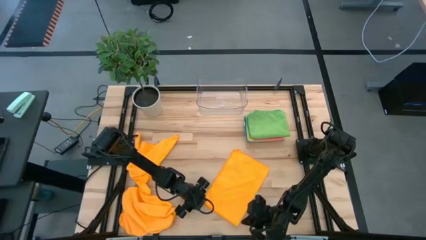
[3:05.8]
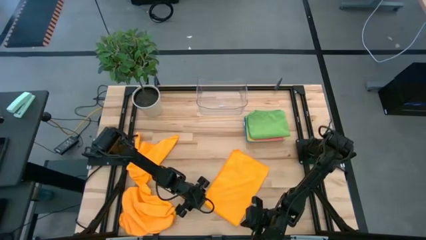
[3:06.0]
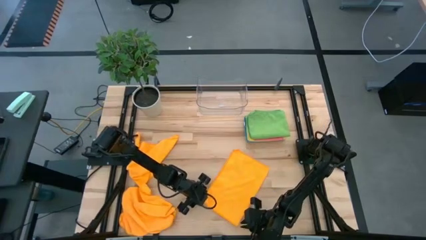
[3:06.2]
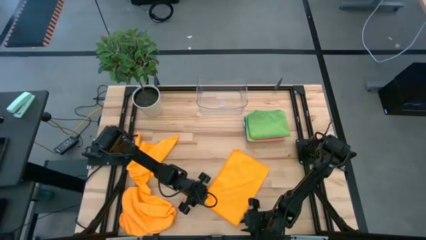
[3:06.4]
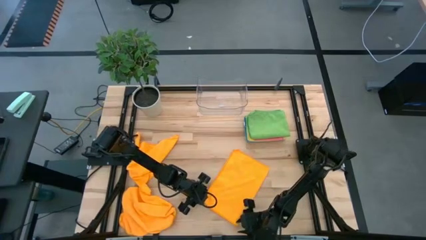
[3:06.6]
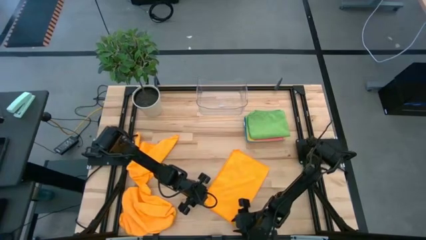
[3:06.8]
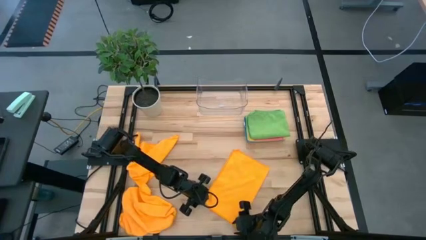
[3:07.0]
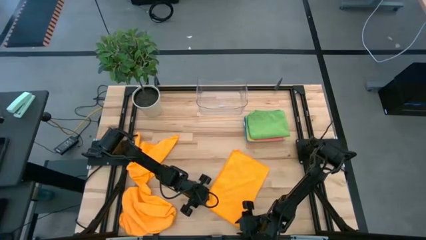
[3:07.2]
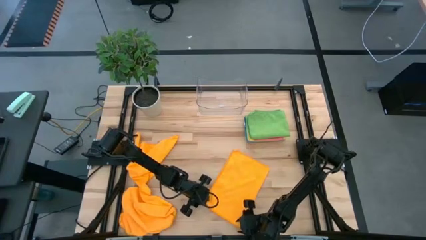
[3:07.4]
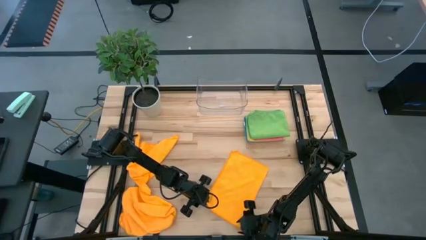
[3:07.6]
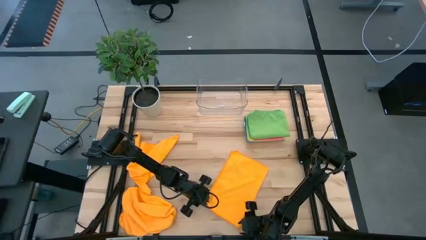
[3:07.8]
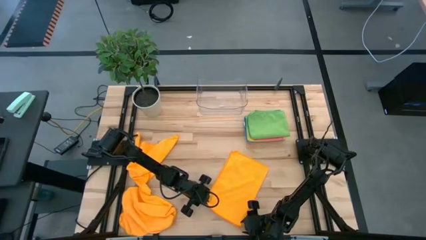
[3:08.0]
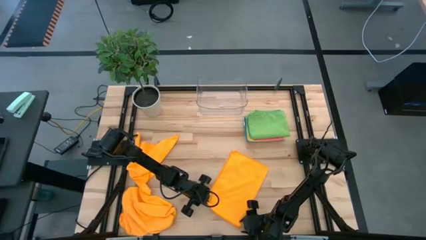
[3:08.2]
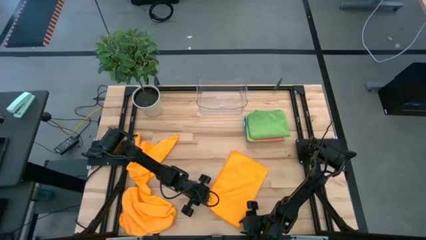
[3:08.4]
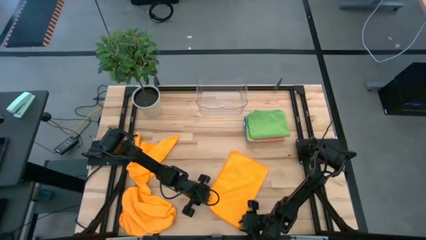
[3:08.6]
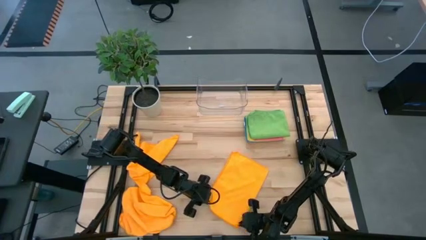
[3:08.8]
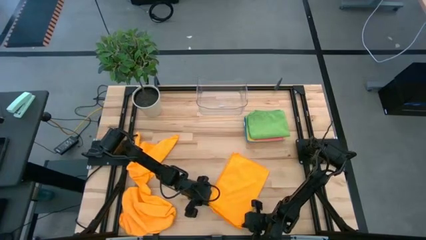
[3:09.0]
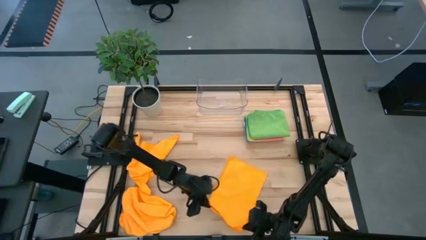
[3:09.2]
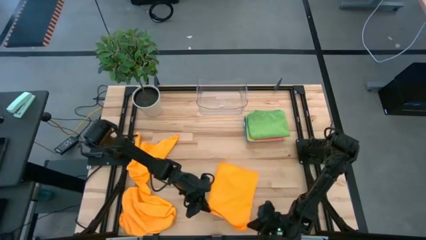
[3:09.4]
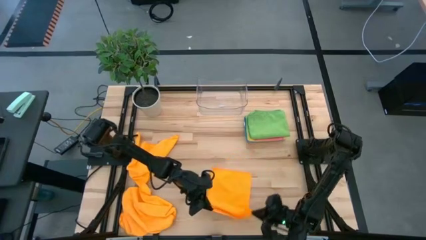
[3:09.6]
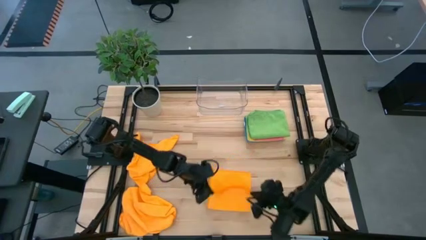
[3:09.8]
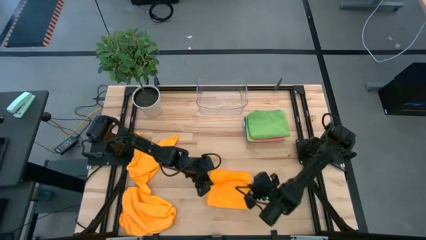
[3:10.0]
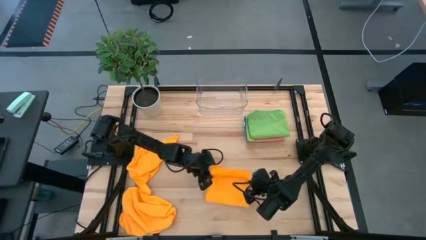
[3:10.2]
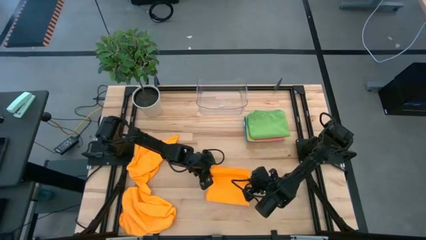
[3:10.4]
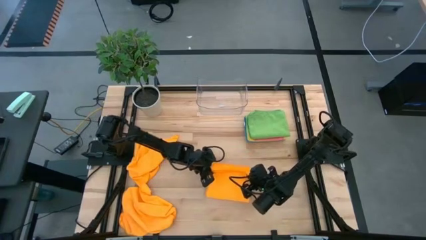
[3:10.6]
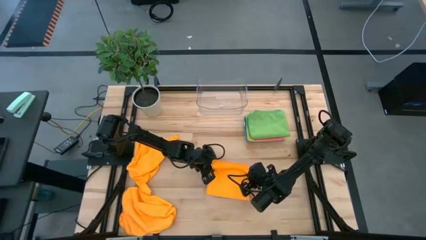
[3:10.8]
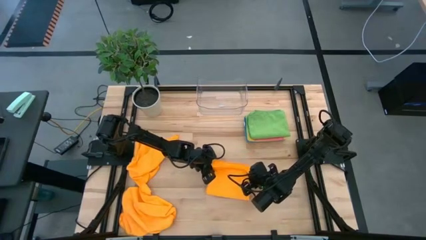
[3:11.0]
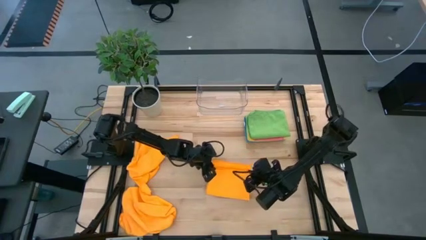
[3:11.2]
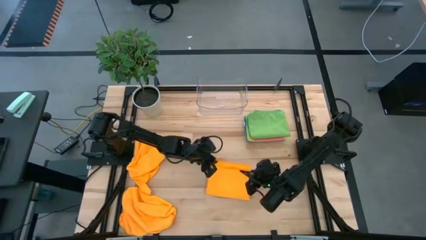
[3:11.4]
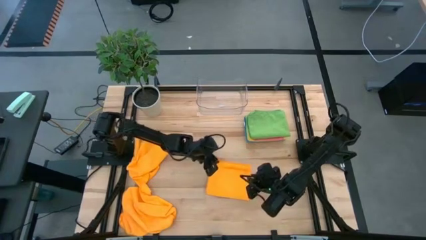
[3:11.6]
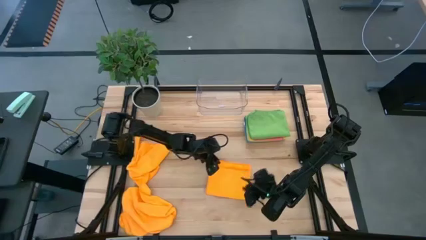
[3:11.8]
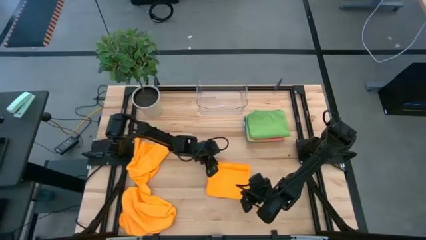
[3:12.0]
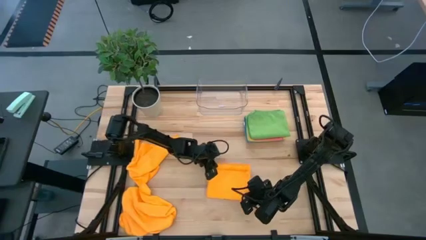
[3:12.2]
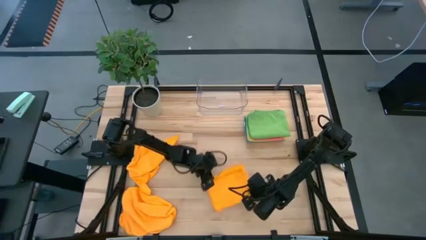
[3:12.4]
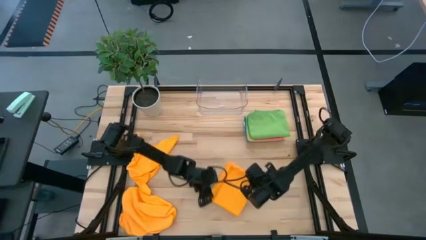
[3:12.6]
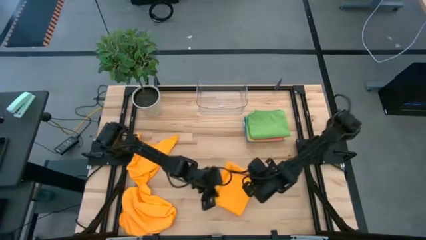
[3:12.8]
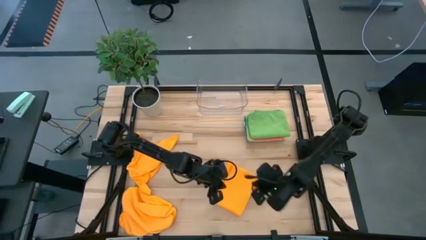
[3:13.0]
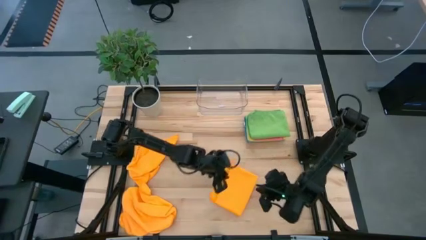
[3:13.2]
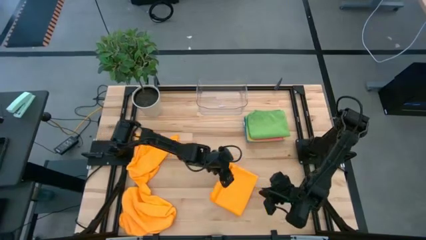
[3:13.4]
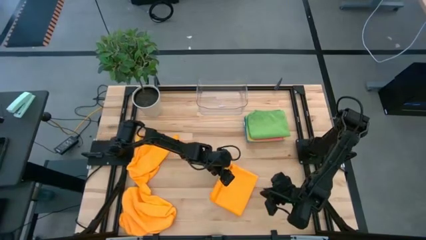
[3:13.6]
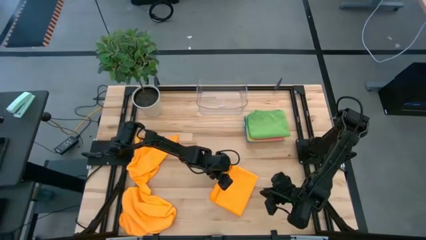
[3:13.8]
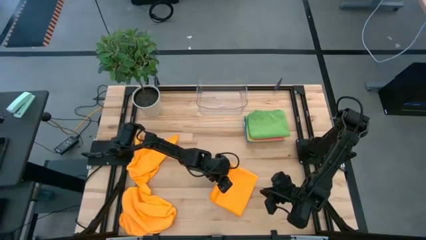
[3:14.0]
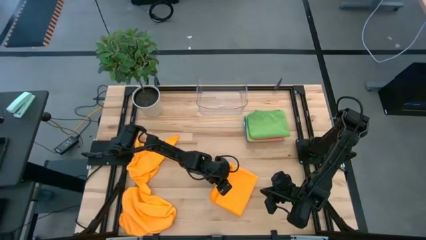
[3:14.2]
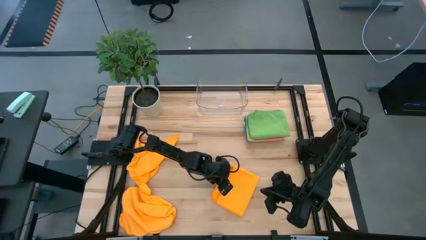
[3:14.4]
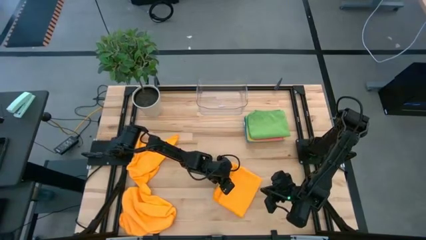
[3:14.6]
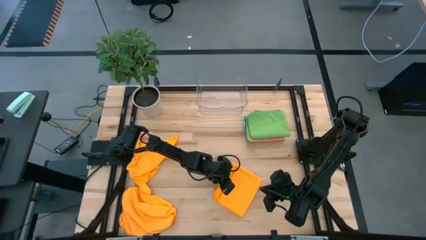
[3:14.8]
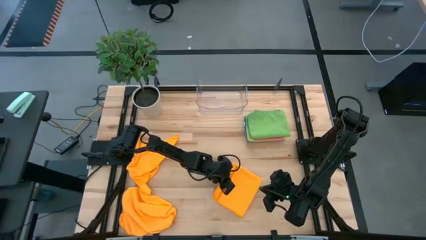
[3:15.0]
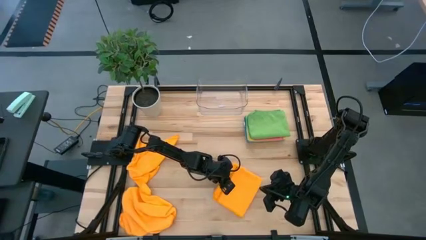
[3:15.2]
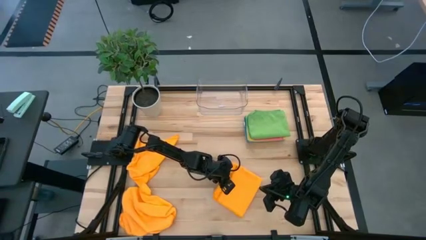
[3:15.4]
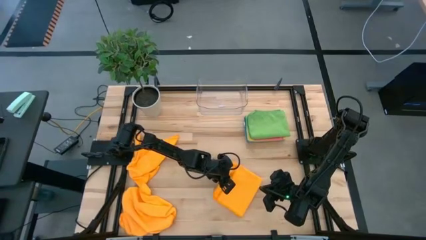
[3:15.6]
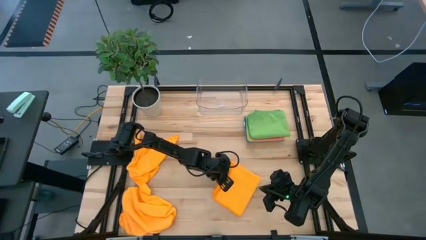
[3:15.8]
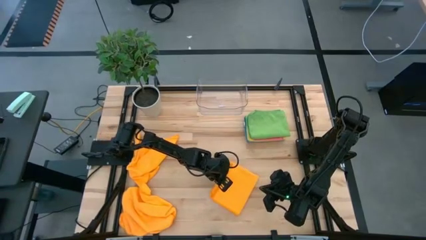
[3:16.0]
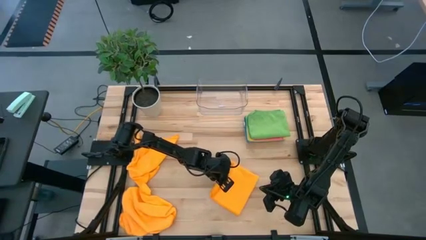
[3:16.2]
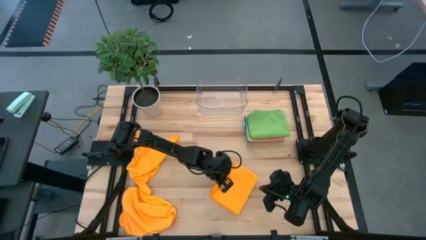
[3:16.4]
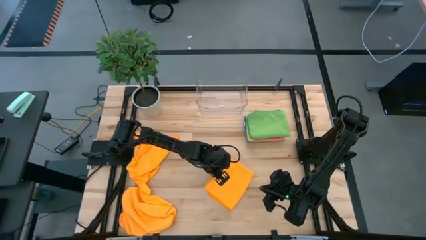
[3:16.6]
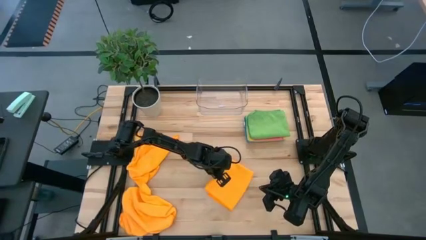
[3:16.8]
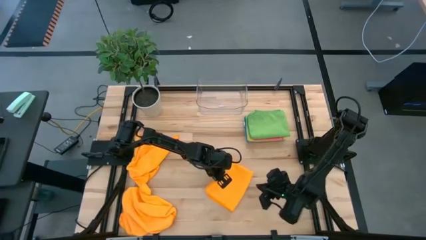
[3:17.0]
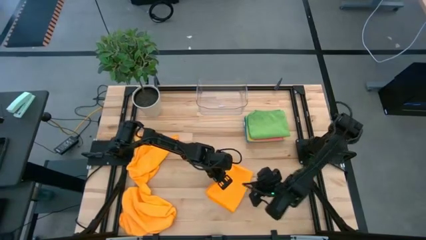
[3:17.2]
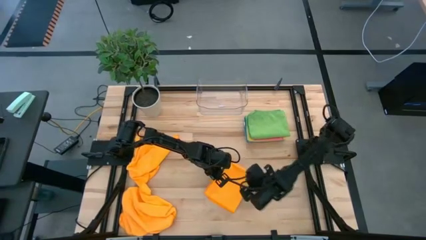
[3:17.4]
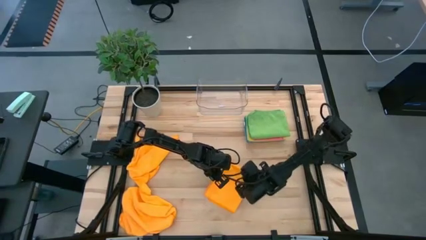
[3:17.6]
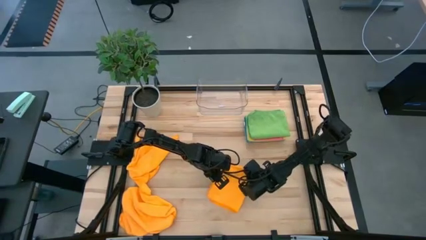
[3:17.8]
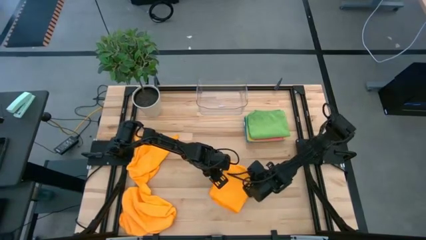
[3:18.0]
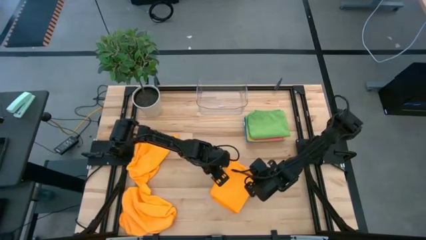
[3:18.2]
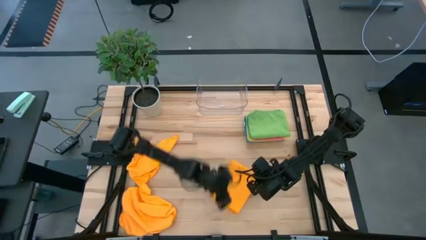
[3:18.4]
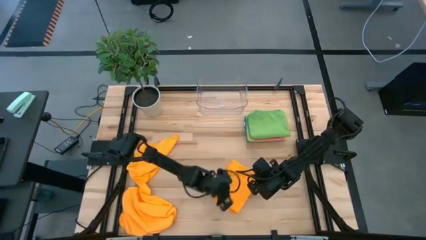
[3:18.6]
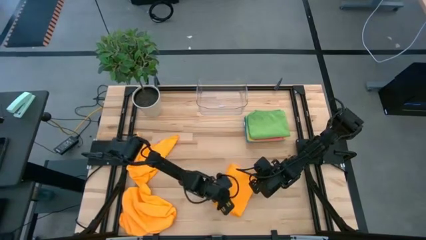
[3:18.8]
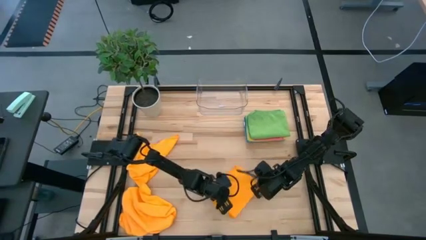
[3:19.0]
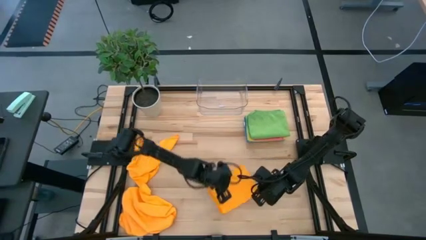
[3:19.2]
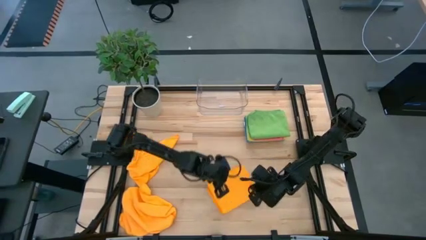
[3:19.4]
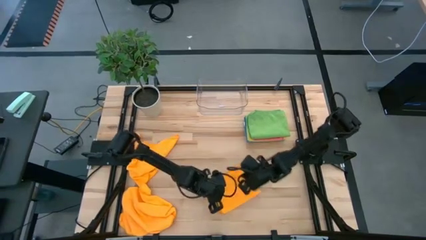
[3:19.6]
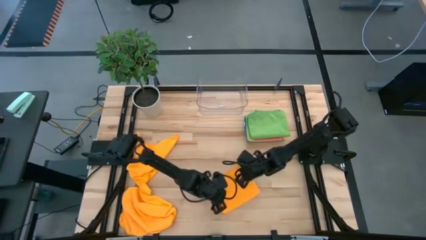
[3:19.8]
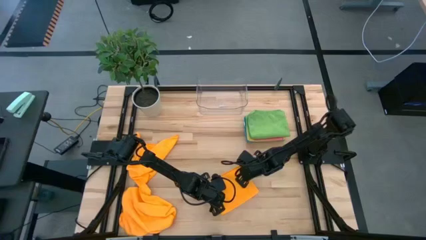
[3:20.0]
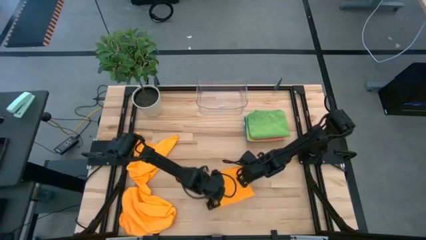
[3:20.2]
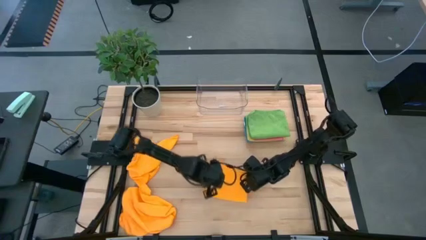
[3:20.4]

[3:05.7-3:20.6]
Task: Fold microfiber towels
Fold the top right orange towel

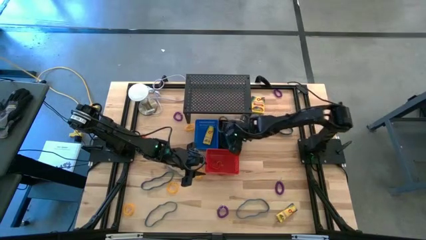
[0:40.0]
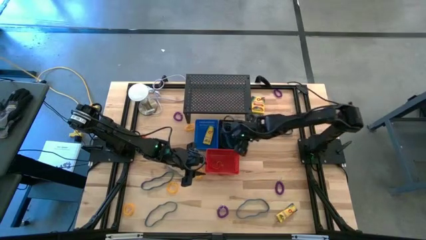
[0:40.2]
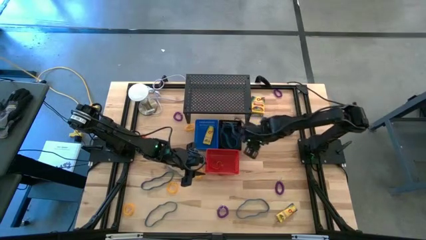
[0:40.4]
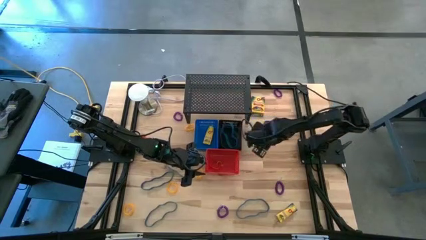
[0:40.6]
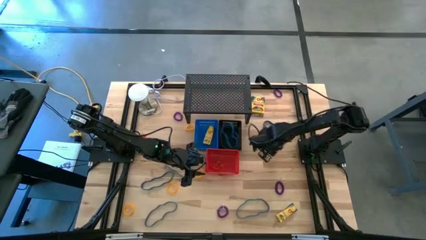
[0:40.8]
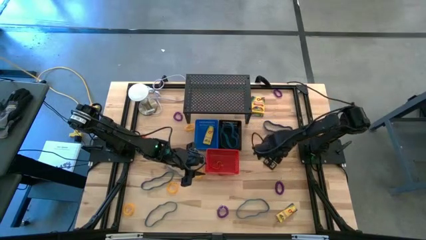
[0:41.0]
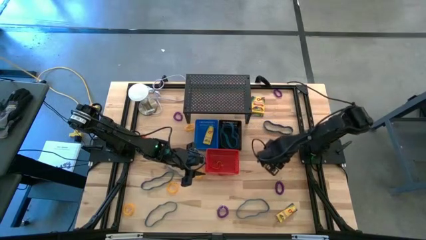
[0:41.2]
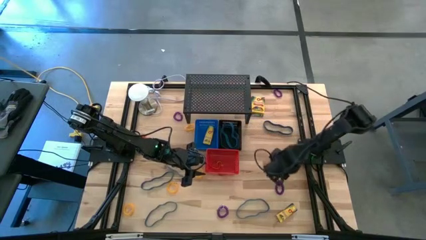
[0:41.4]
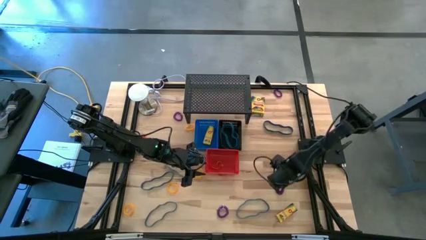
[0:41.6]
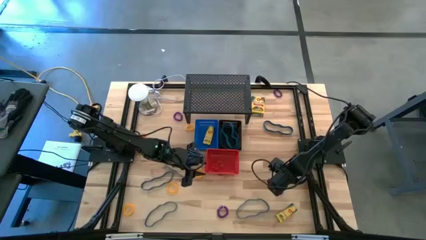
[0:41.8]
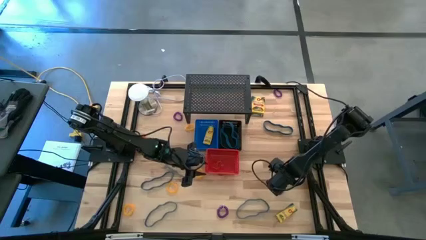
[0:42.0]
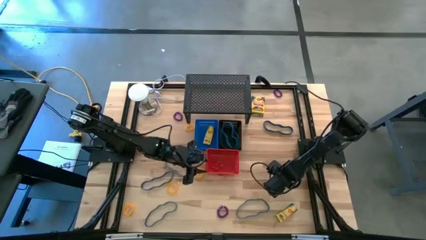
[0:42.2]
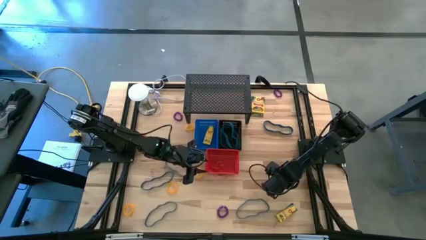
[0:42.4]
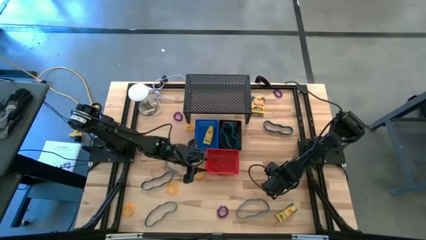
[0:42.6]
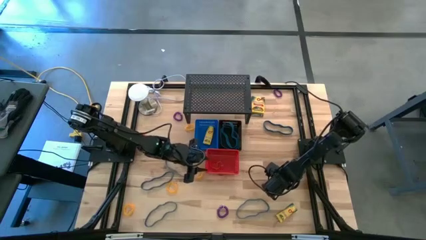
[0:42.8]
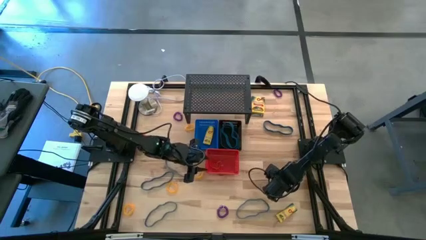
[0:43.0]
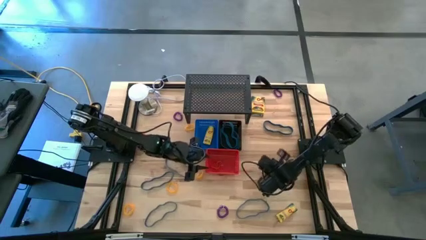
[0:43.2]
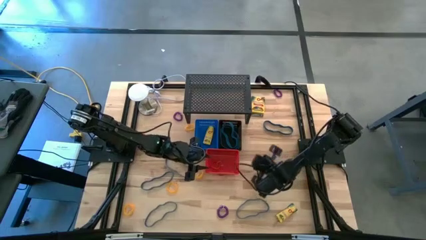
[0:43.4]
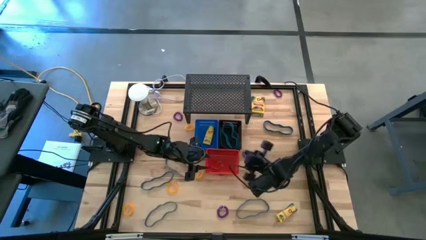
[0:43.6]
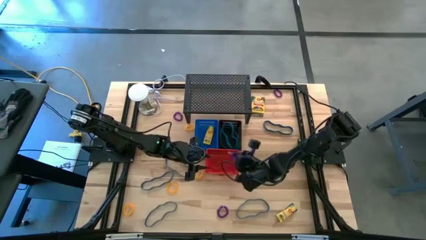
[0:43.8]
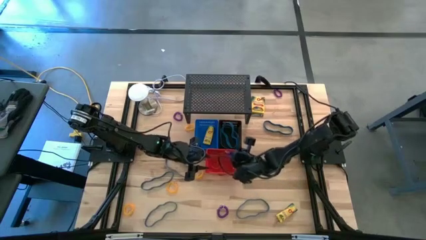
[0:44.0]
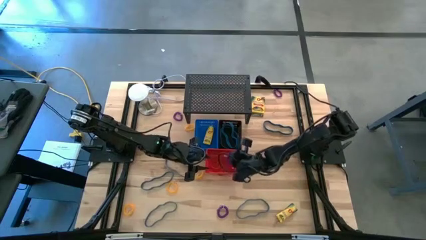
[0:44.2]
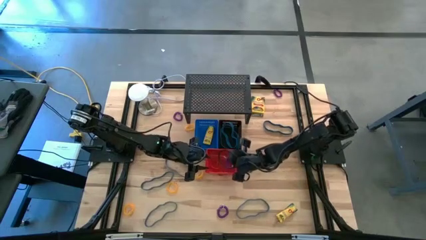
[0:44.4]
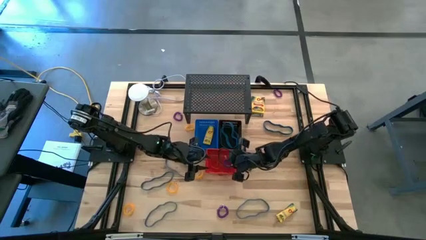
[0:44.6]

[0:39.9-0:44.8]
Task: Pick & Place Office Desk Supplies
Put the violet spring keychain into the red bin
